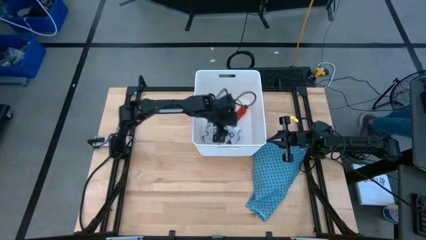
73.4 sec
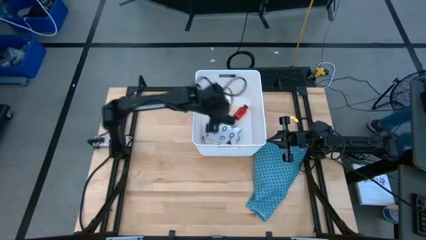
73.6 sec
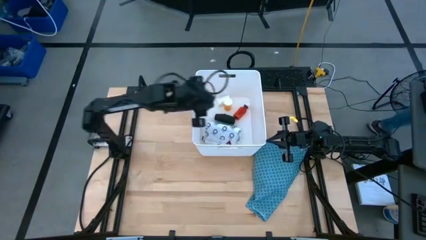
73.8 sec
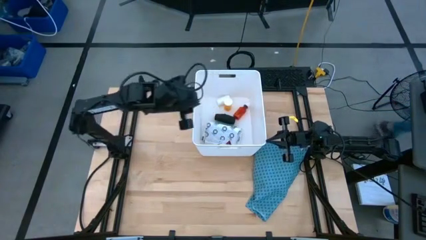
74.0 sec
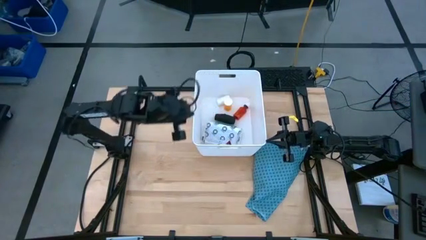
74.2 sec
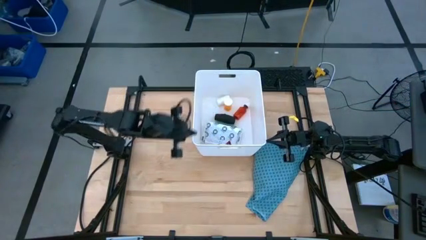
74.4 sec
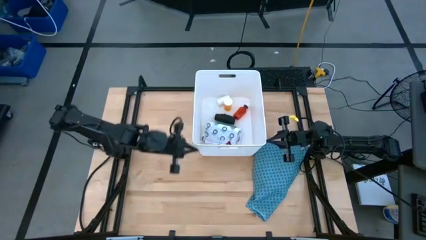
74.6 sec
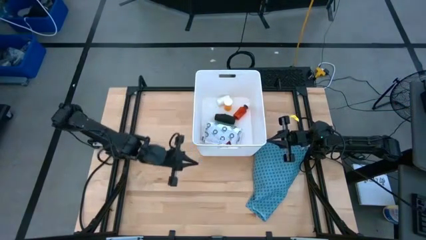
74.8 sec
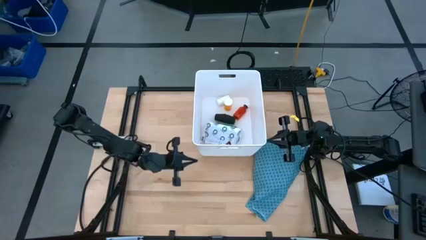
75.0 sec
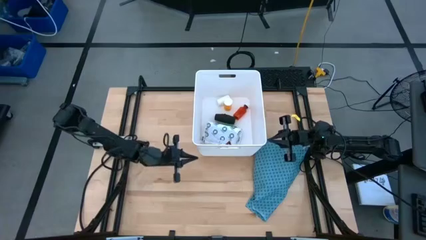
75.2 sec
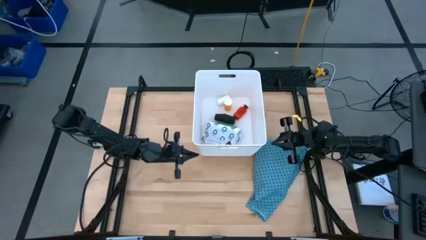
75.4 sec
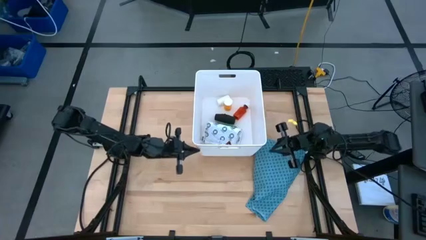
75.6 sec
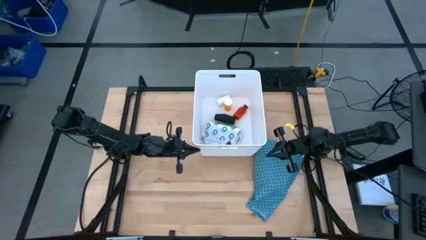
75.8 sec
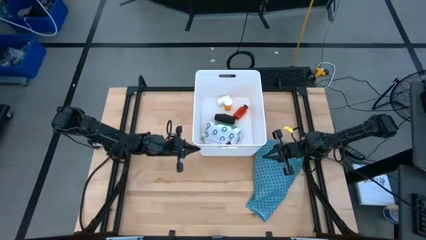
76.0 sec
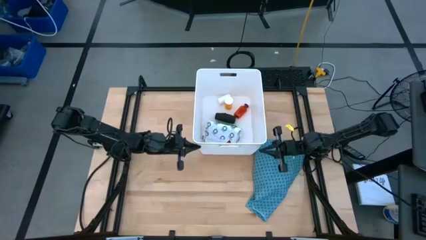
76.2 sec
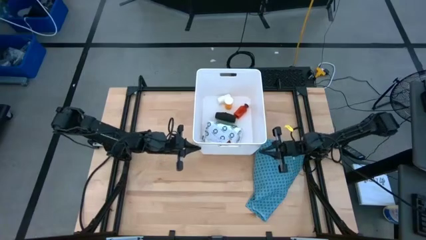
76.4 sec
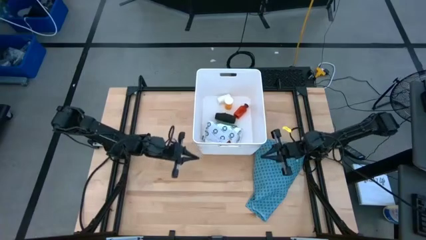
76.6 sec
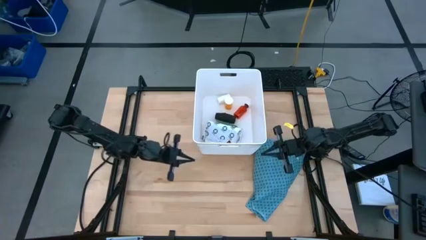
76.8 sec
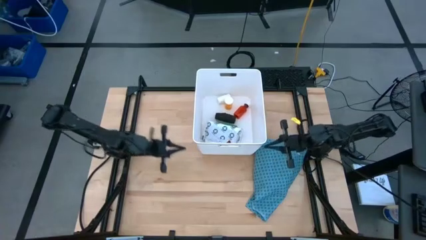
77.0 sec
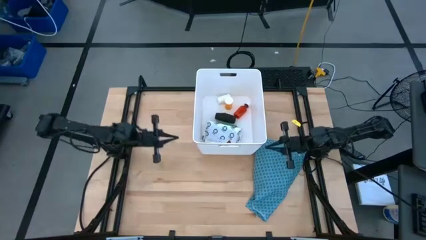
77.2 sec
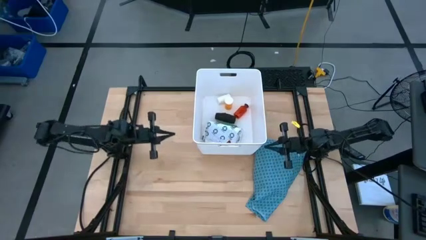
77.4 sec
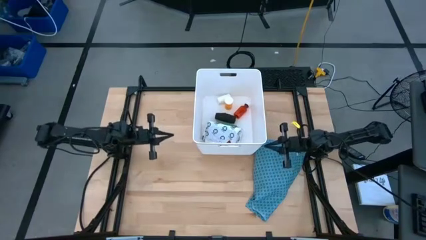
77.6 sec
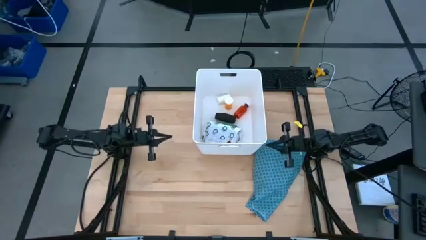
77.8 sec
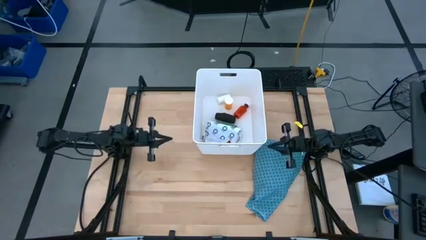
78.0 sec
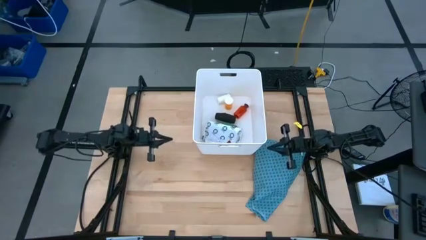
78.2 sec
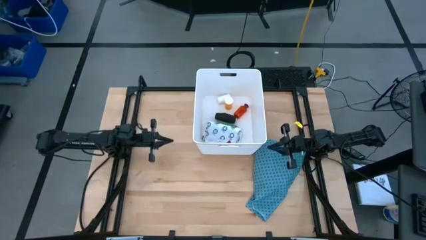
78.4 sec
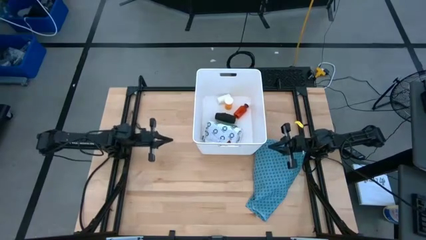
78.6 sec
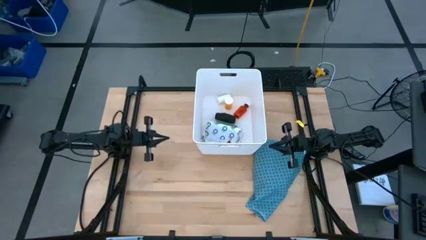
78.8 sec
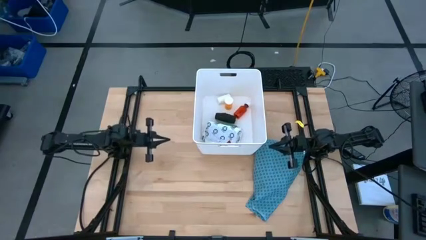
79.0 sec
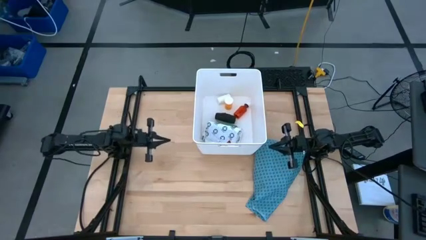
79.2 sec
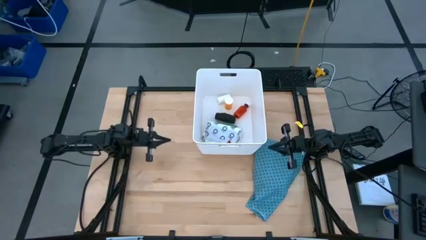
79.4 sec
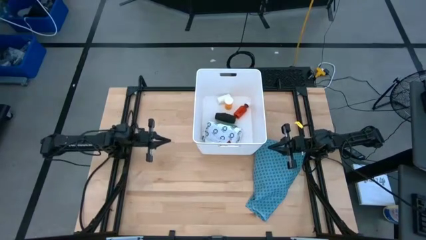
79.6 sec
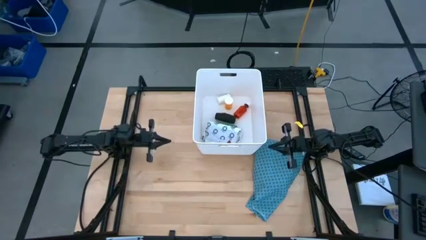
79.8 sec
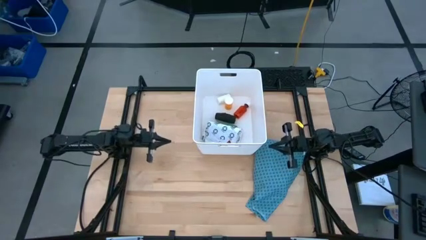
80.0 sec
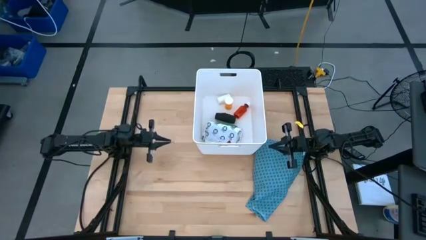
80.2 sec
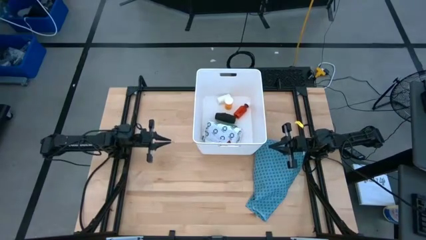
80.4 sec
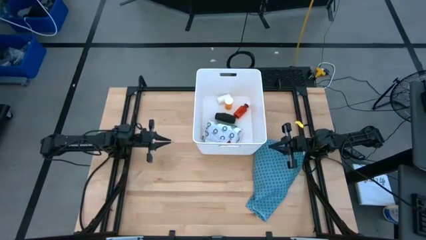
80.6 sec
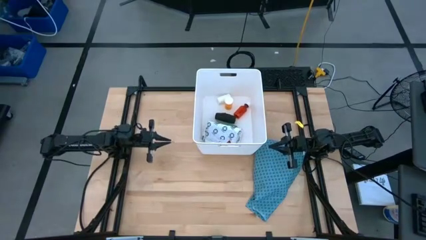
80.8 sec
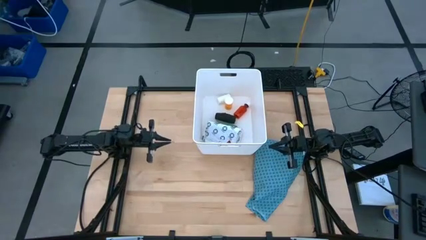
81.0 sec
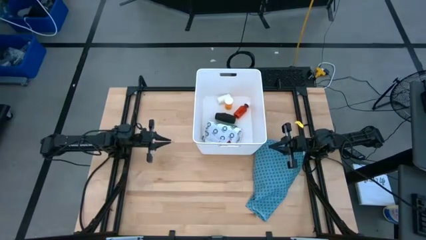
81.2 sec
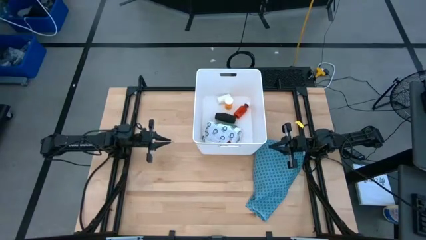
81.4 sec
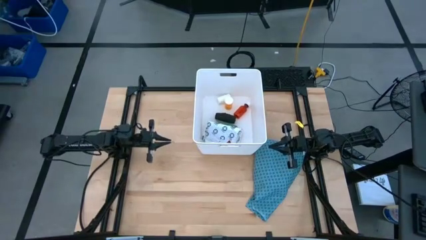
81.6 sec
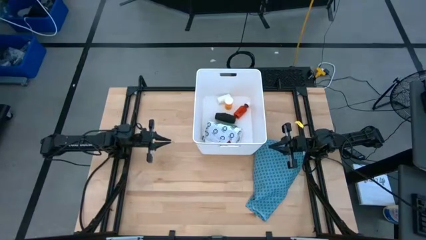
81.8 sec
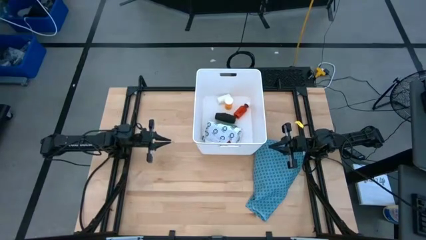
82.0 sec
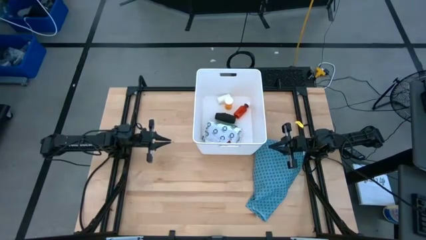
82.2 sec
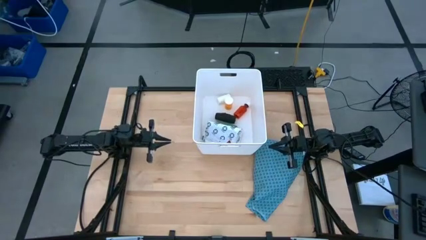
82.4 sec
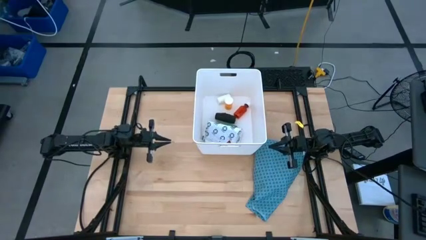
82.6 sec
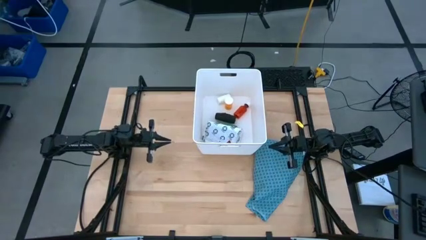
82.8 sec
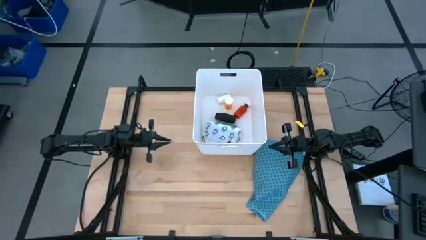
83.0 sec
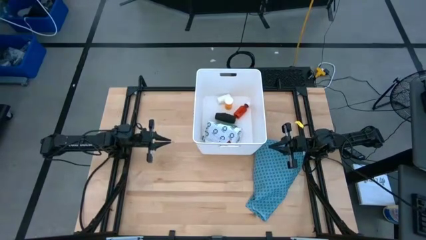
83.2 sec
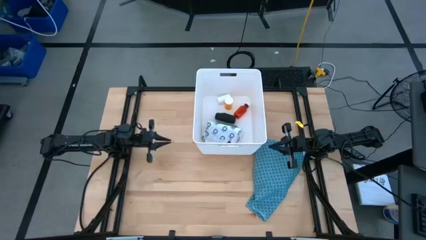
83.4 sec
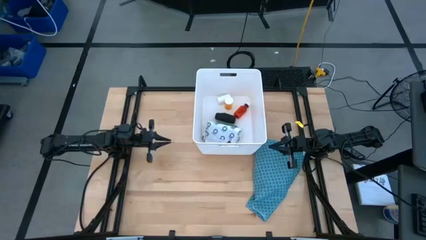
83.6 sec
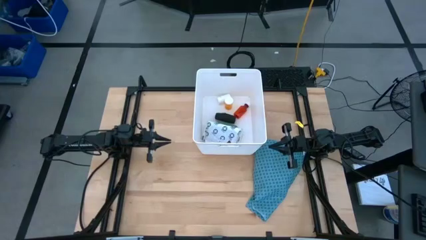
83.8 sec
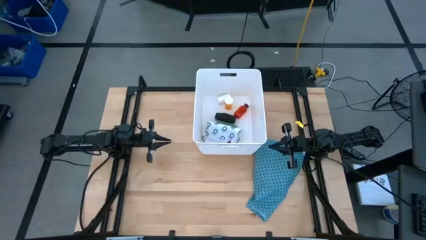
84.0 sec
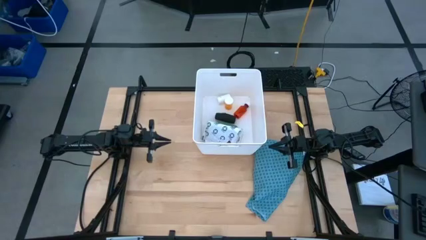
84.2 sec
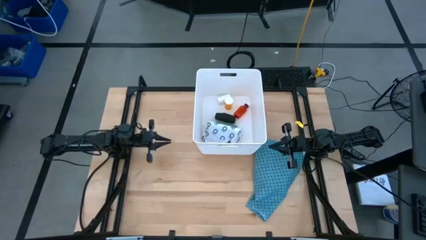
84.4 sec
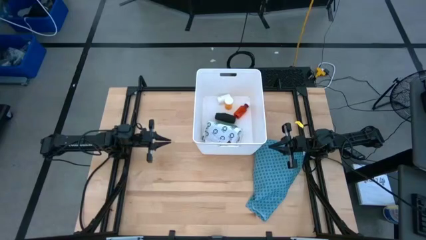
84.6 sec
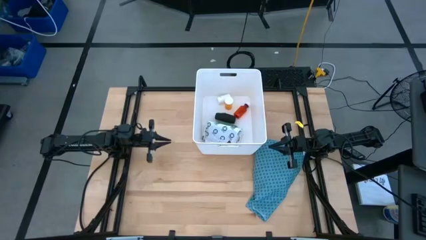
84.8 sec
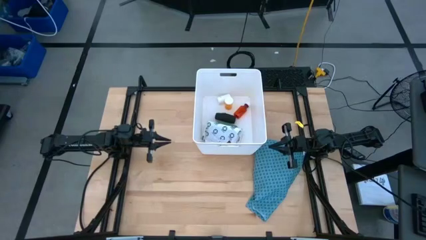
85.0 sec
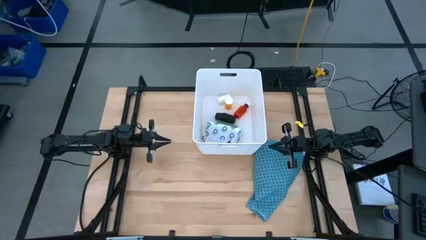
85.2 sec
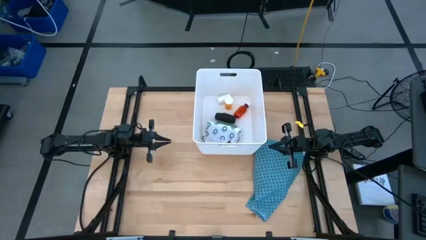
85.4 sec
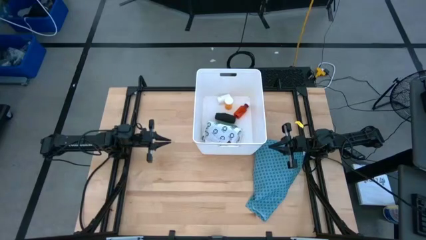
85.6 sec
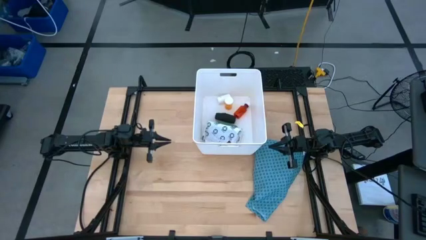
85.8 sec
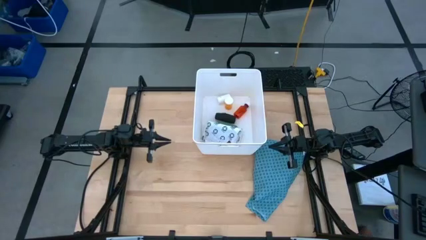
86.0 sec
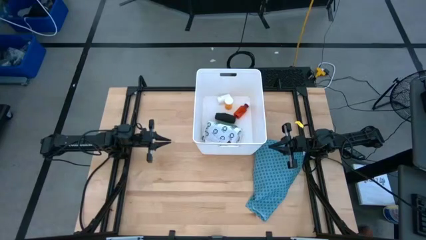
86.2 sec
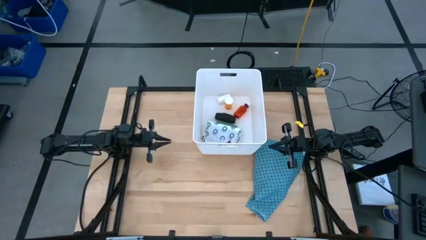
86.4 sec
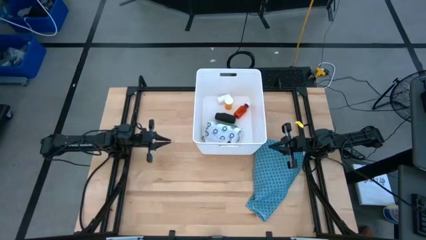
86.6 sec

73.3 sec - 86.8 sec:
Task: Pick & place medical supplies in basket/bin
Return to Home Position

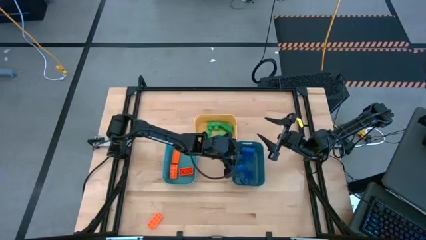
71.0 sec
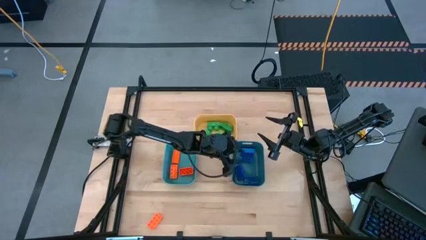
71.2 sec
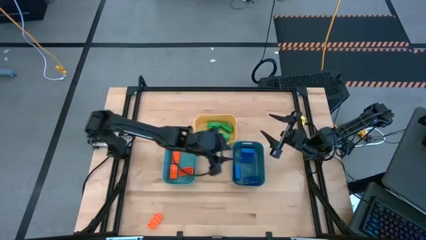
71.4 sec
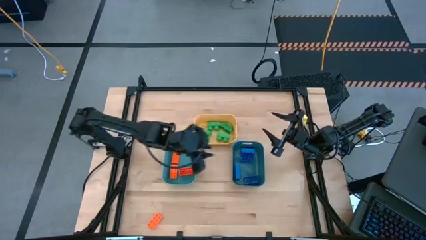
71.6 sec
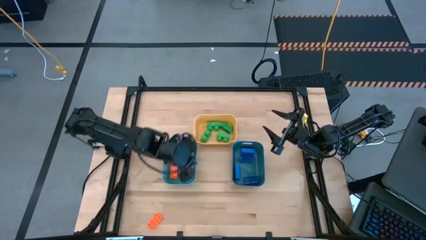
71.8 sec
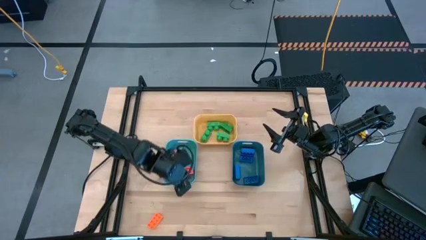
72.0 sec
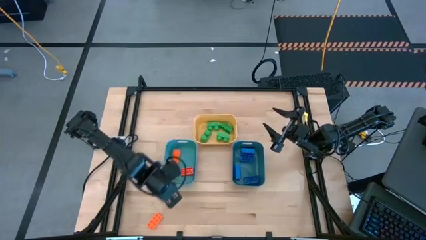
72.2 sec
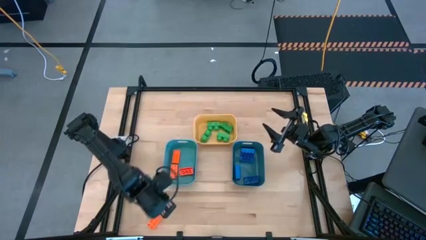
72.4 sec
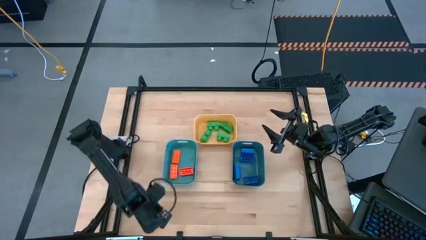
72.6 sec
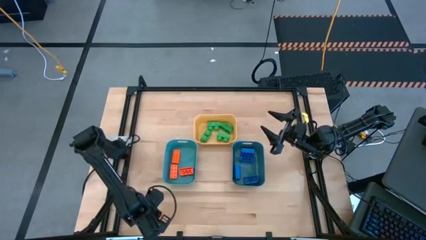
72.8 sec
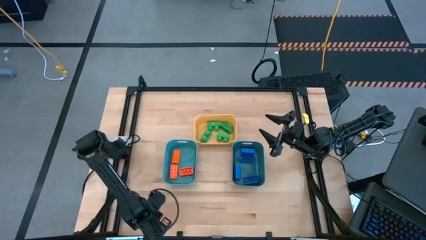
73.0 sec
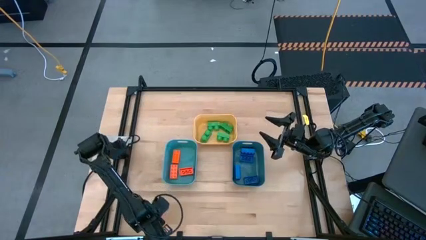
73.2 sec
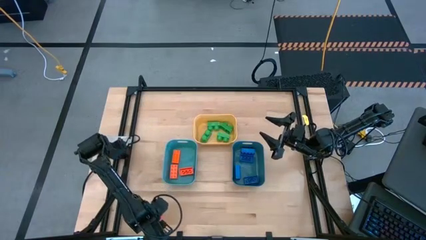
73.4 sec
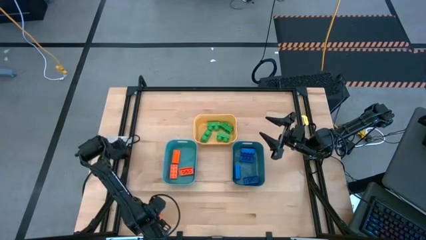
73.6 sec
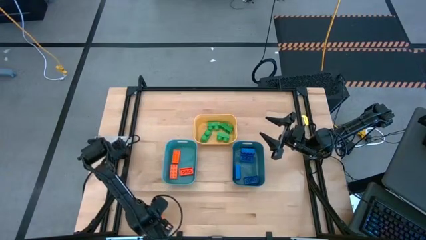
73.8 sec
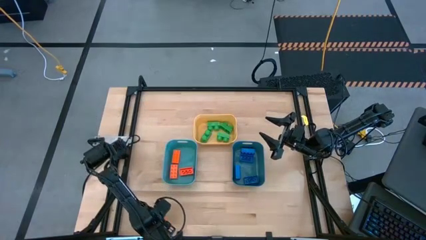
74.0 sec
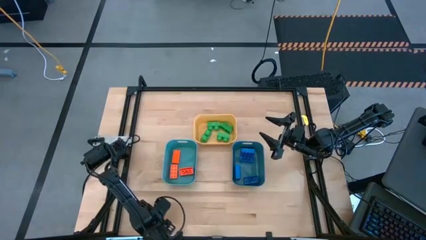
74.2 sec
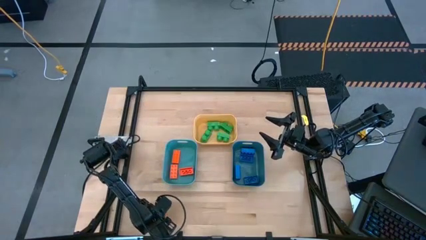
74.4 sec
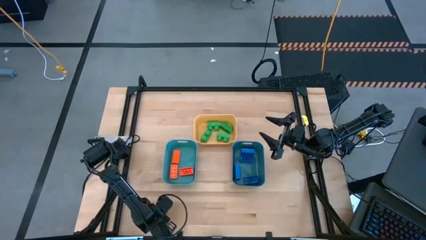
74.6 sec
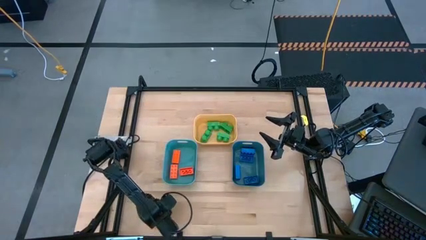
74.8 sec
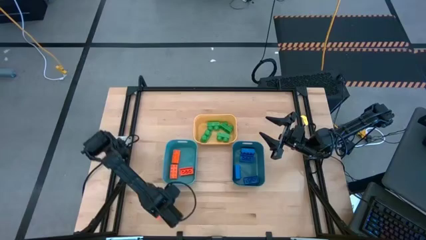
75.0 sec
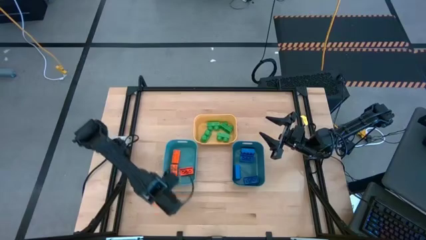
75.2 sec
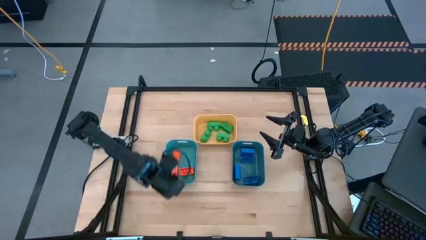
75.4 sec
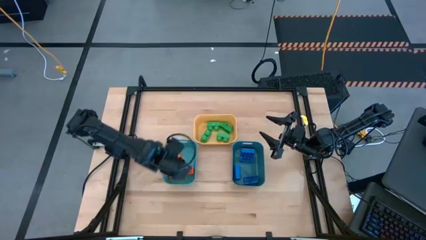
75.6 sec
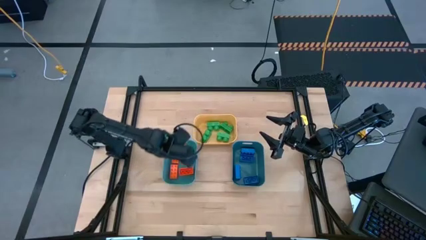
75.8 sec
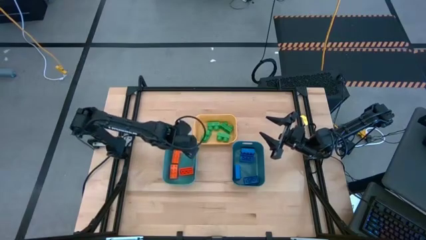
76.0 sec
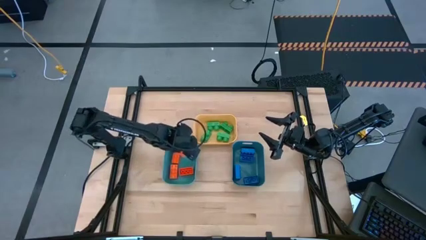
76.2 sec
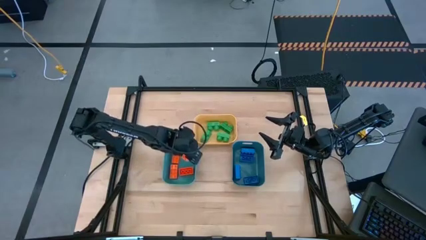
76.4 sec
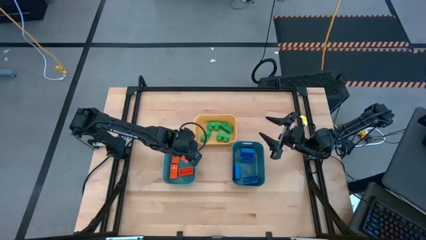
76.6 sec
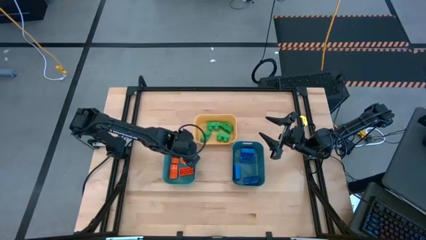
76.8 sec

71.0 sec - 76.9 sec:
Task: Sort & place blocks by color
Put the orange game piece into the light blue bin
